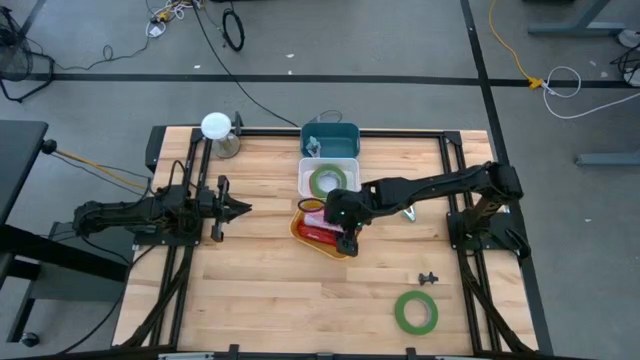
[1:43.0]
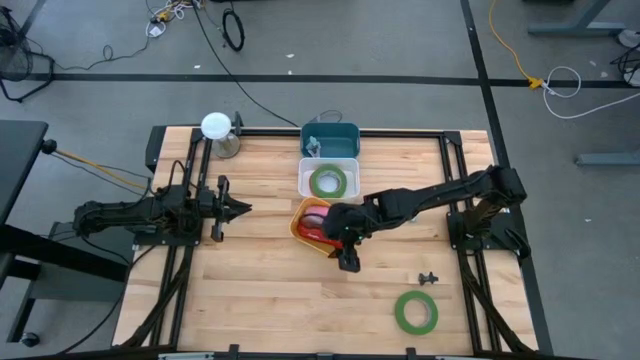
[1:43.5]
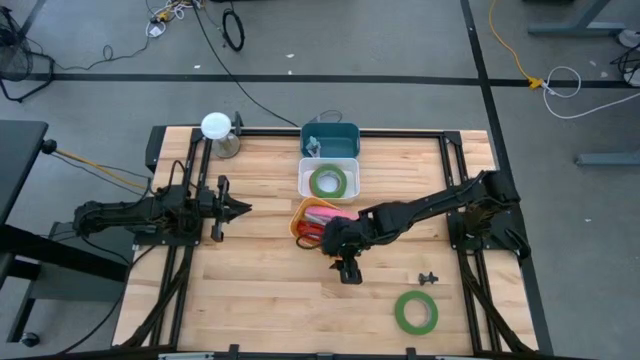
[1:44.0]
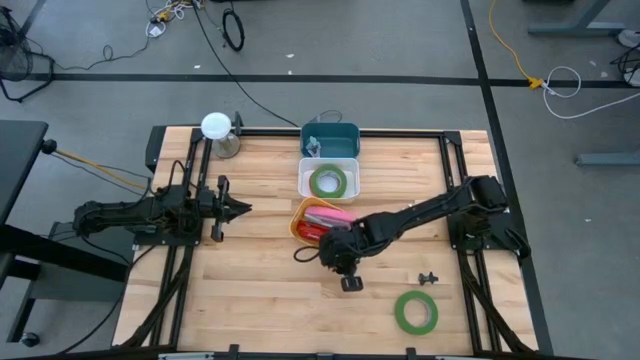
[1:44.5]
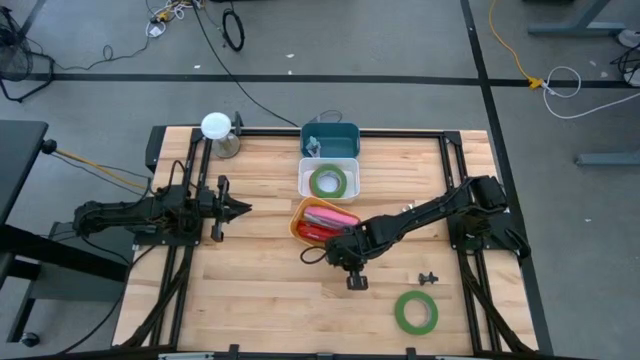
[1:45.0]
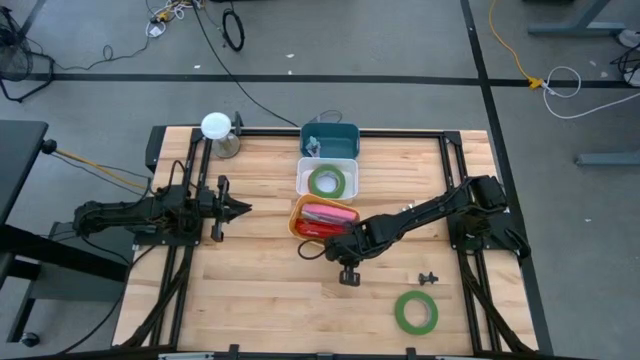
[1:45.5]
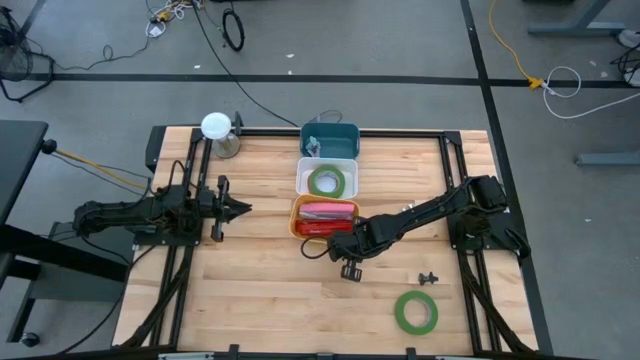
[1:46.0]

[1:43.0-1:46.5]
Task: Pick and place Stapler, Stapler remover, tape
Adjust the yellow bin

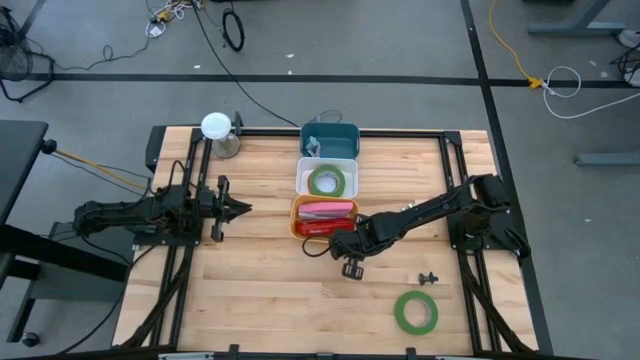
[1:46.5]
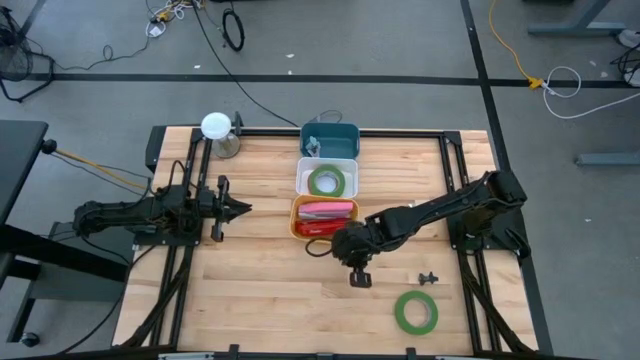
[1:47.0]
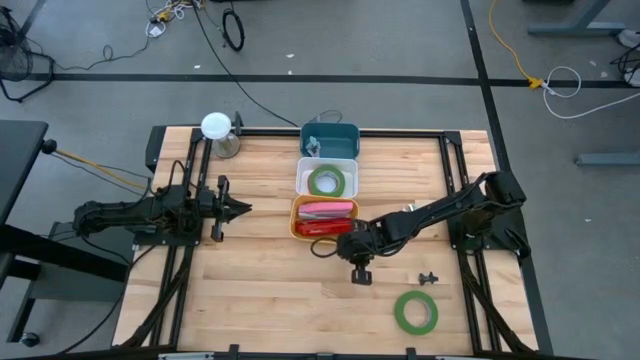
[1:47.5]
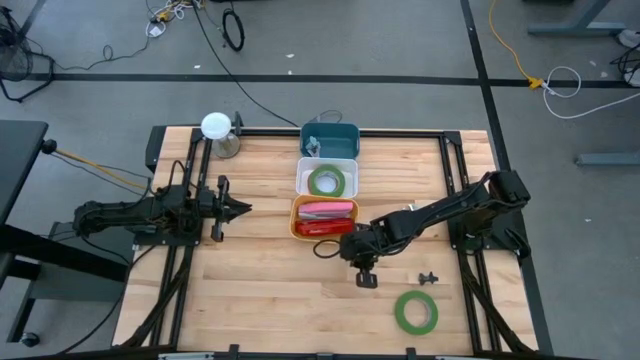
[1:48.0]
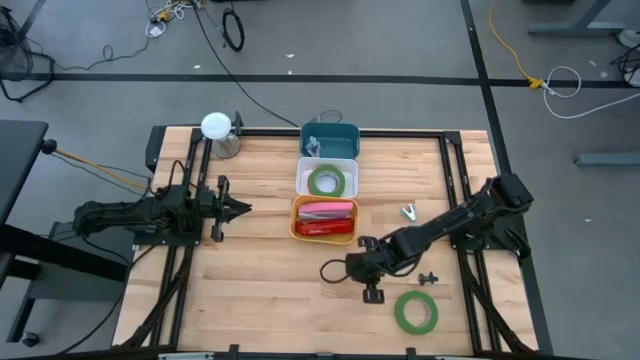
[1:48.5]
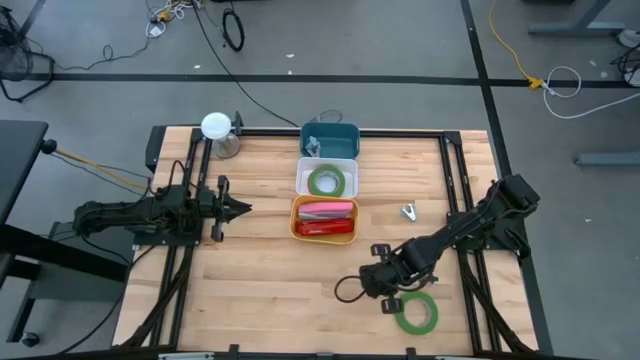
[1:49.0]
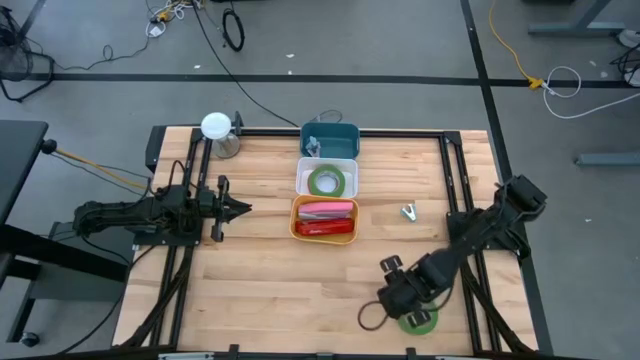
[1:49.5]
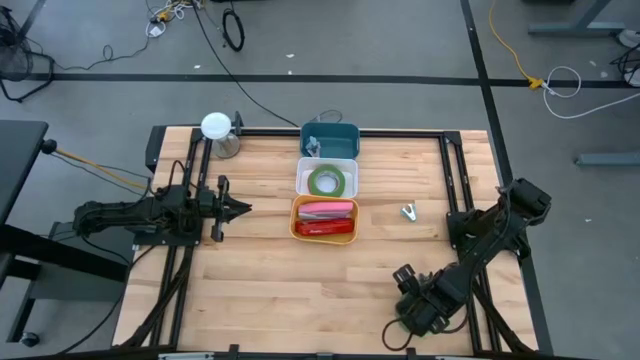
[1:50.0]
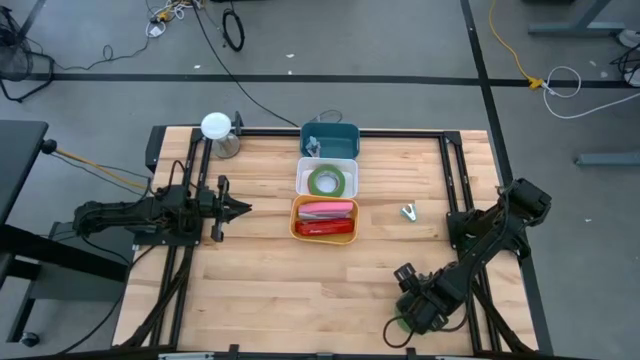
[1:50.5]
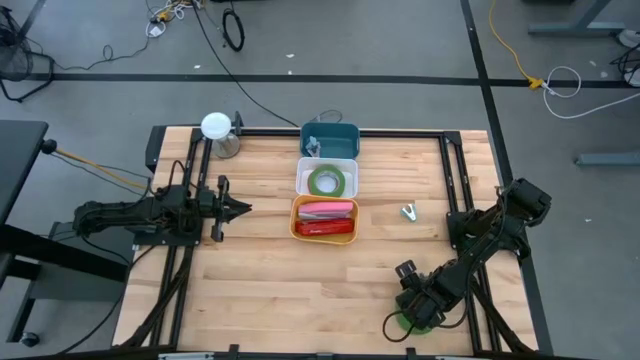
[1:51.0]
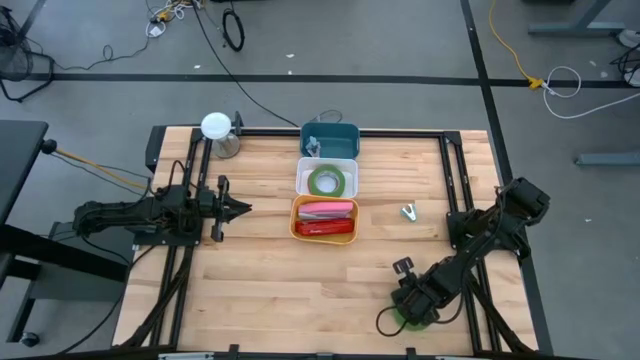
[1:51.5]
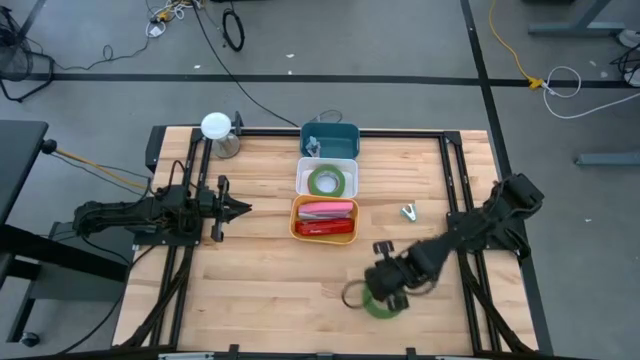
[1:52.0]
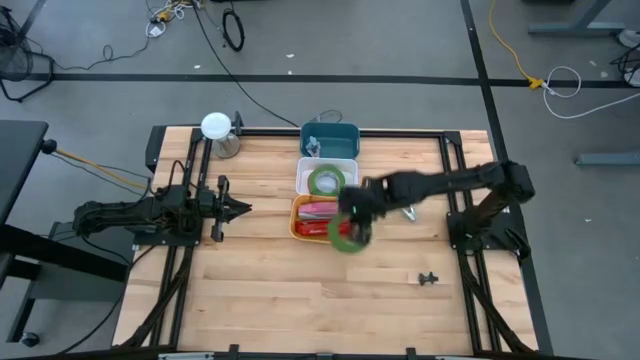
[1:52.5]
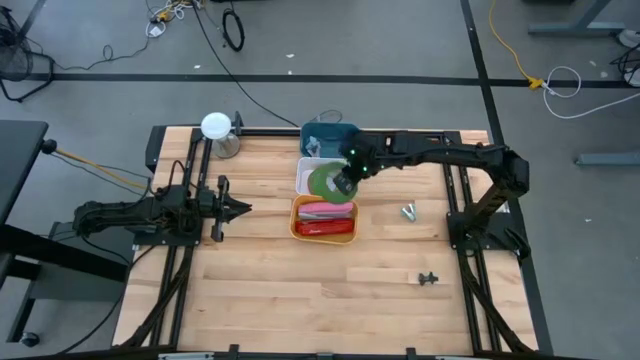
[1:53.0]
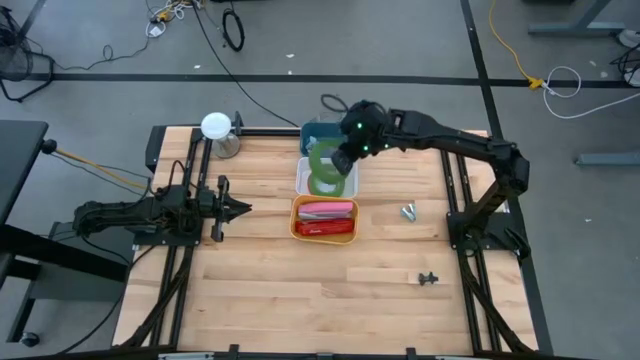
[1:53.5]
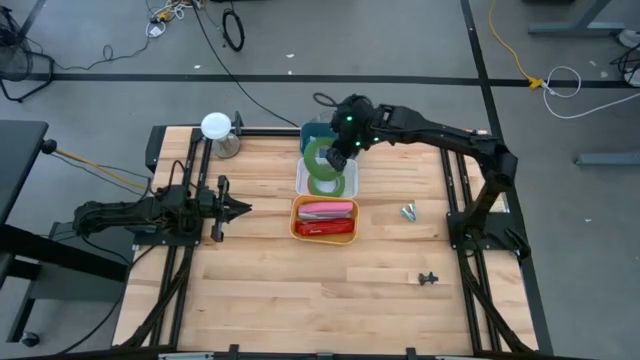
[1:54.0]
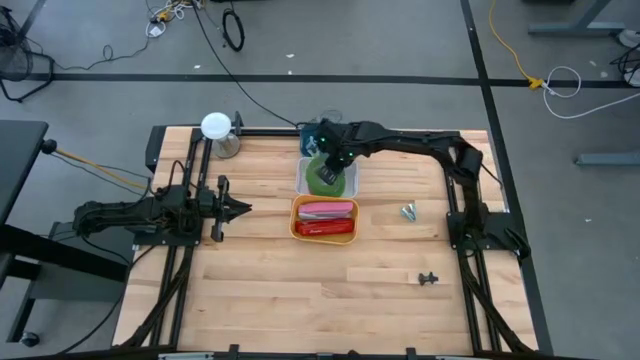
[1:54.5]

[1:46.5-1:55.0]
Put the green tape into the white bin

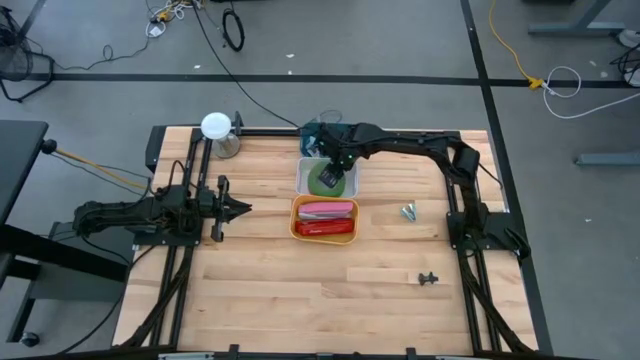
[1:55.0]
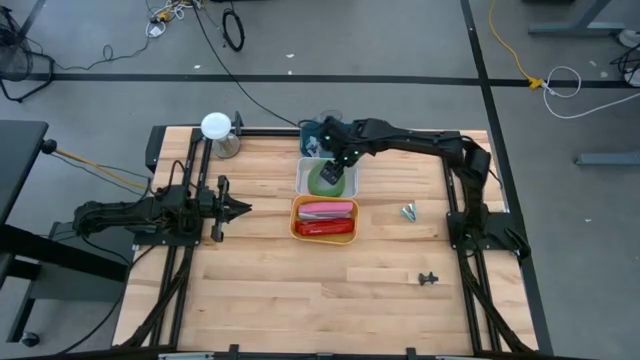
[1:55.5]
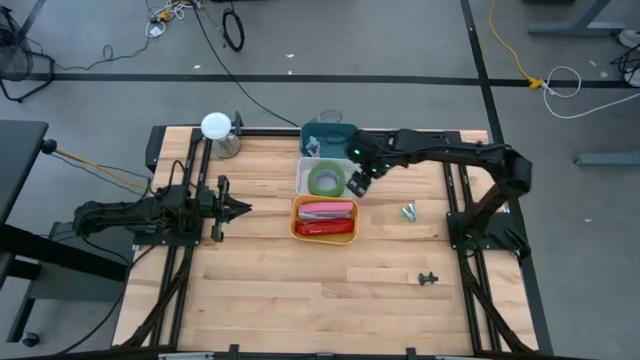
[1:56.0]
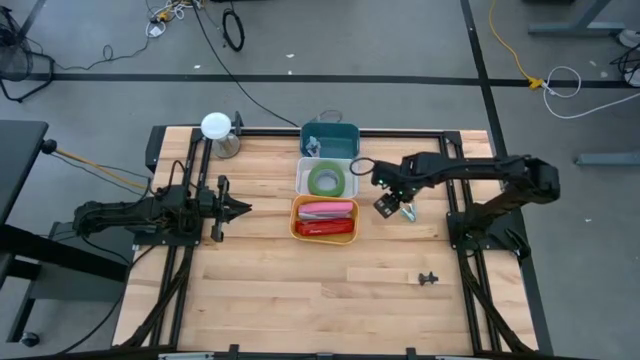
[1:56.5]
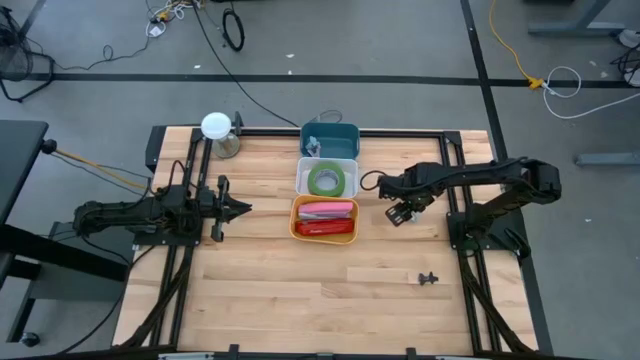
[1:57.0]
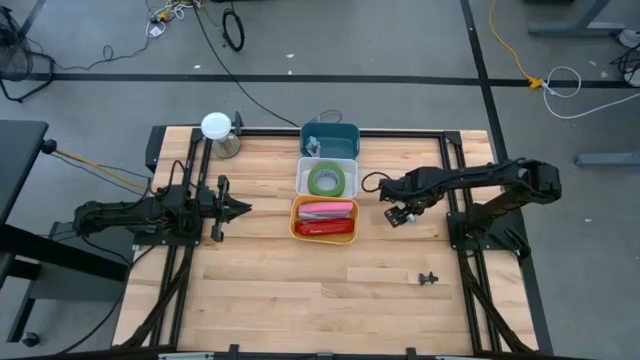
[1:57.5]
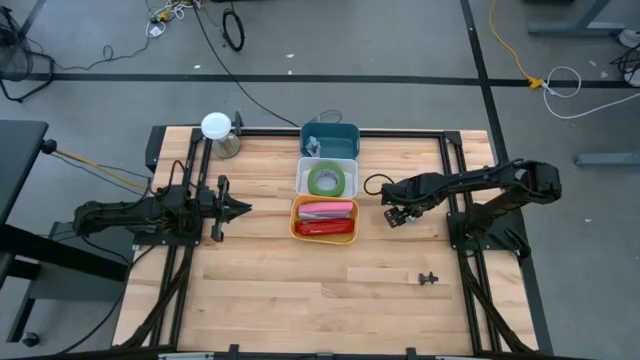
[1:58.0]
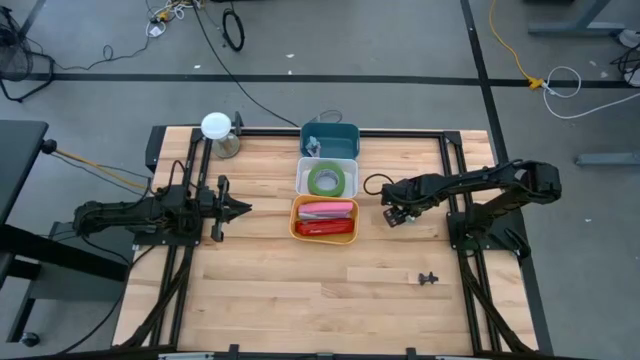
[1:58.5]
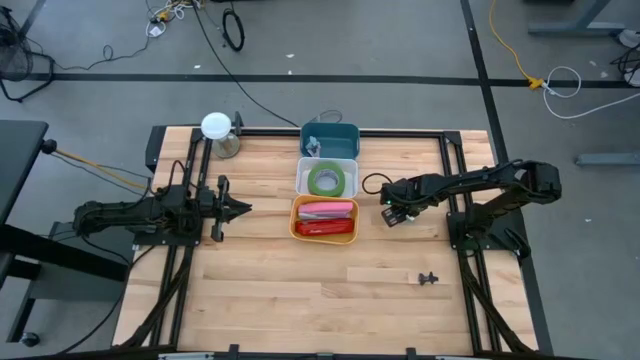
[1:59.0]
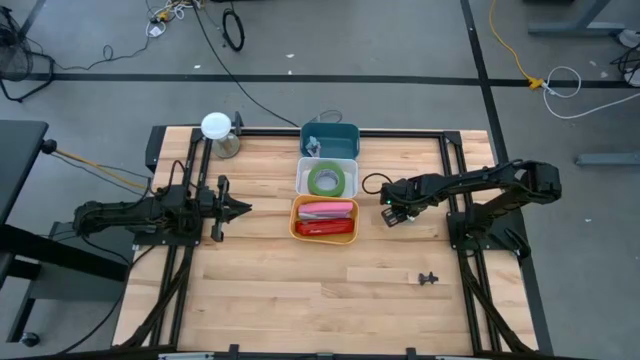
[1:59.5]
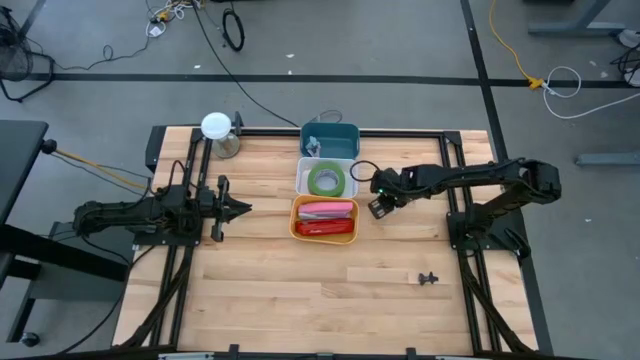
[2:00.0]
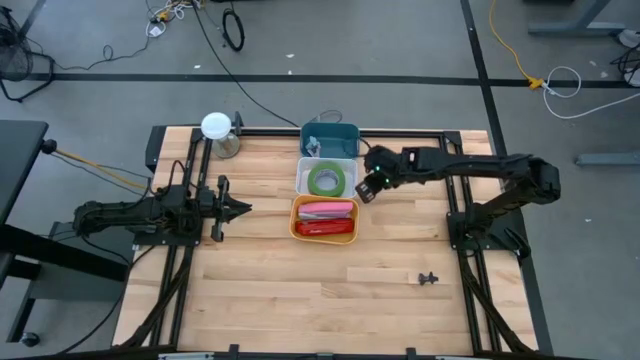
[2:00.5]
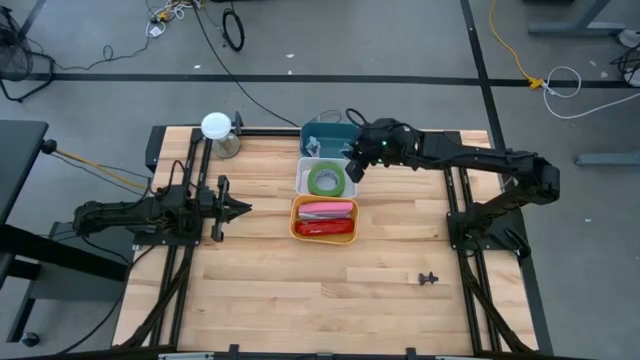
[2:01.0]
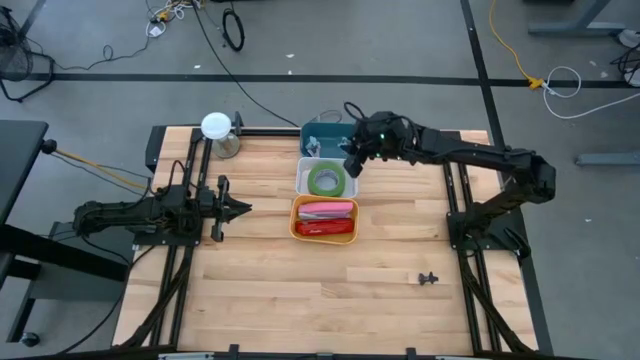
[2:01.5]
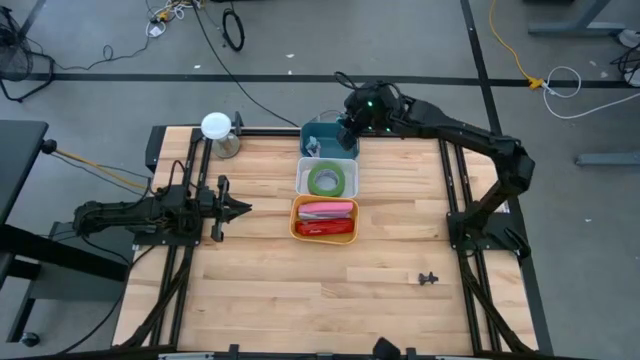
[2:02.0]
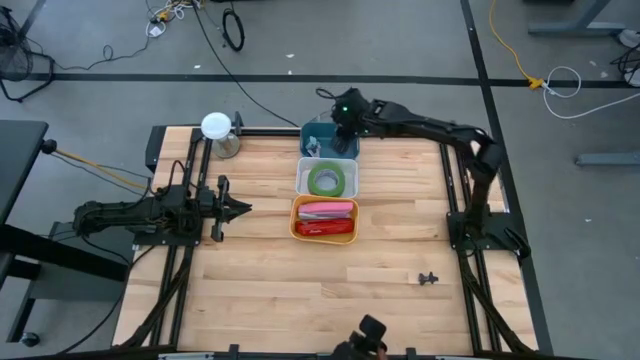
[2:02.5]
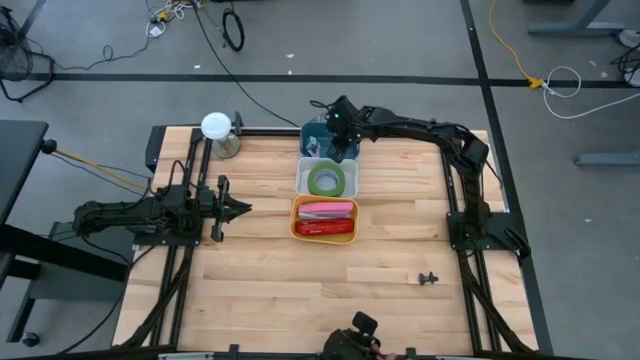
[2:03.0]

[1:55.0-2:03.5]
Put the light blue stapler remover into the blue bin
